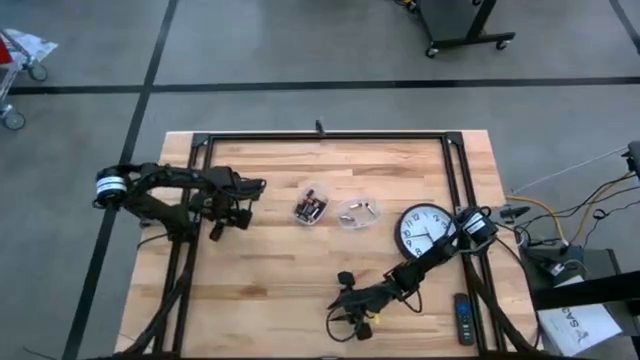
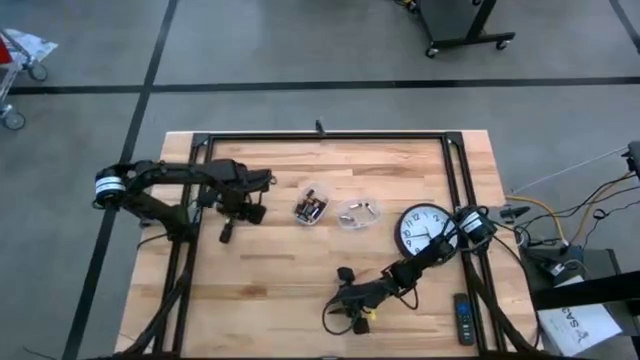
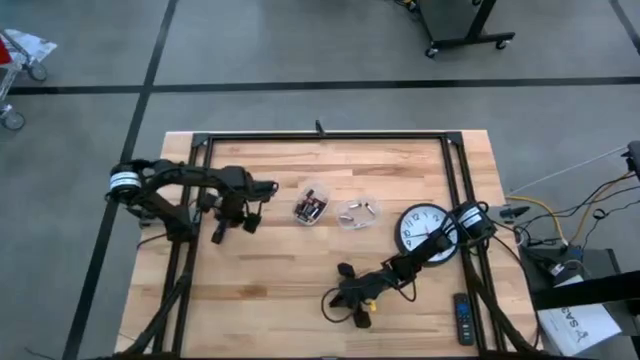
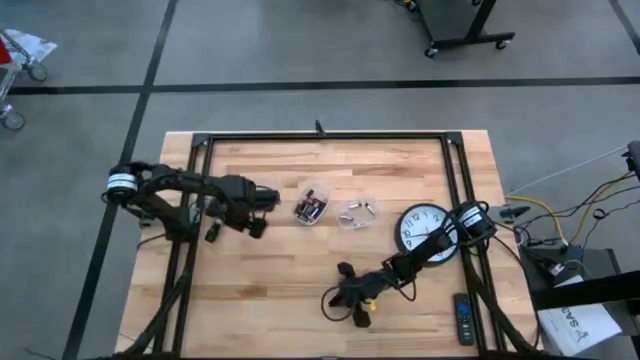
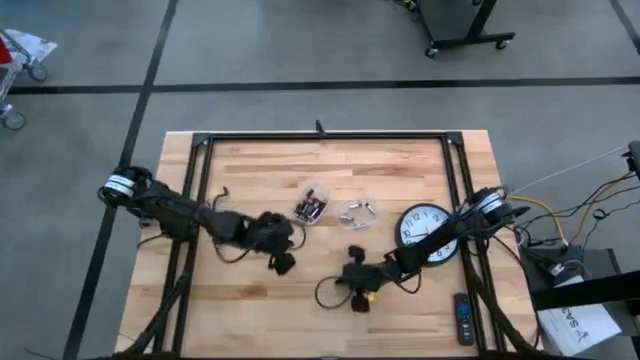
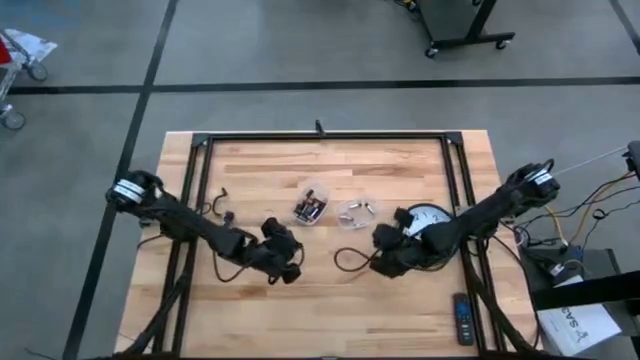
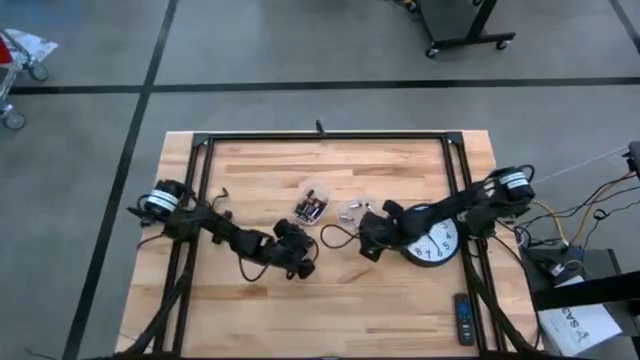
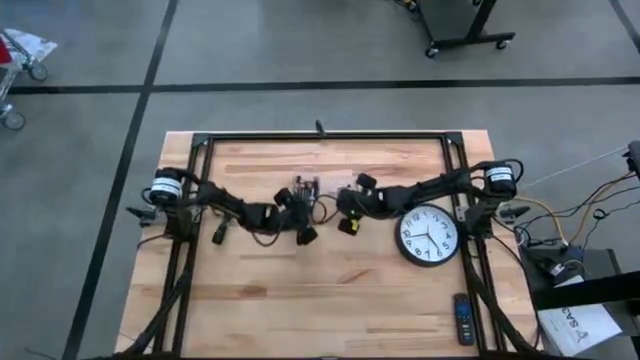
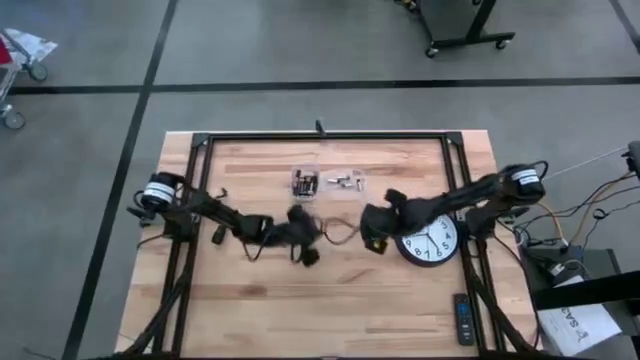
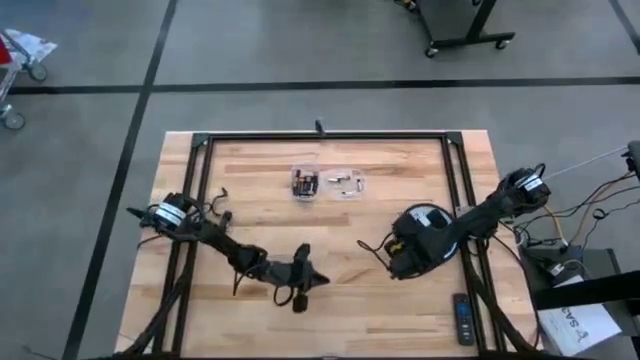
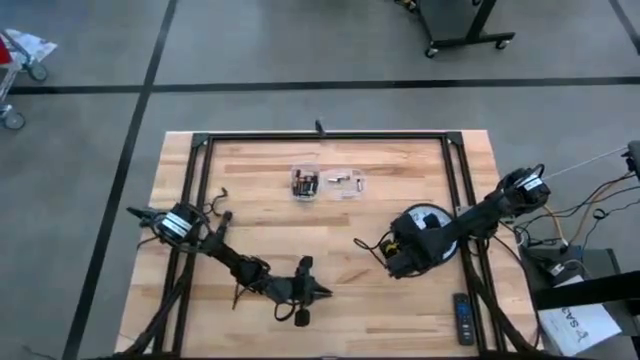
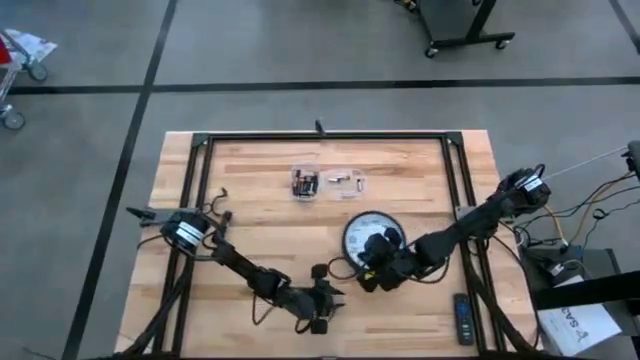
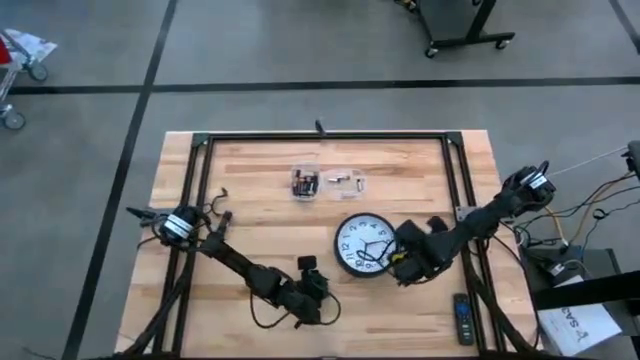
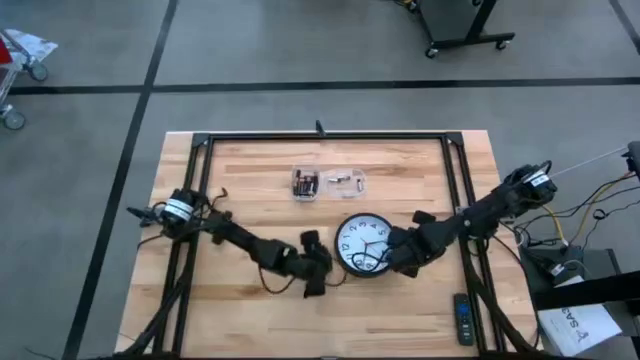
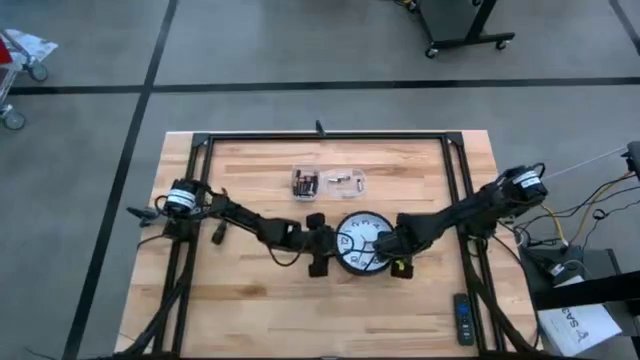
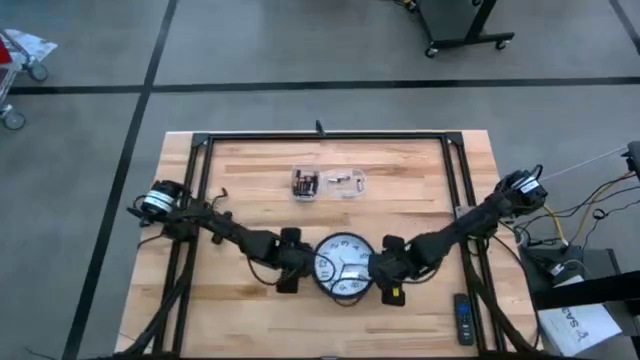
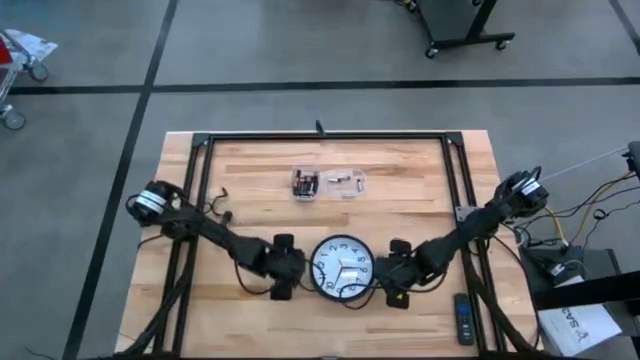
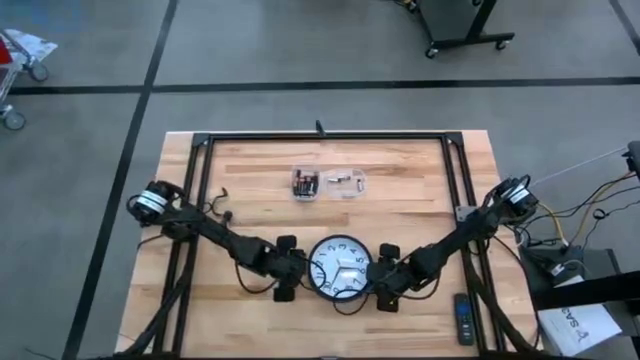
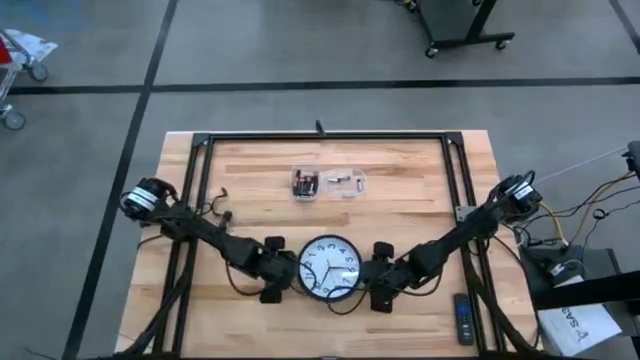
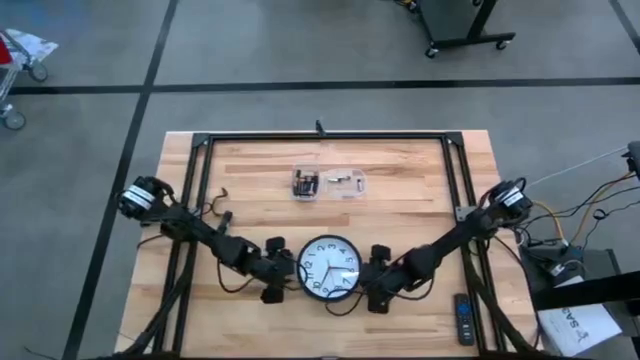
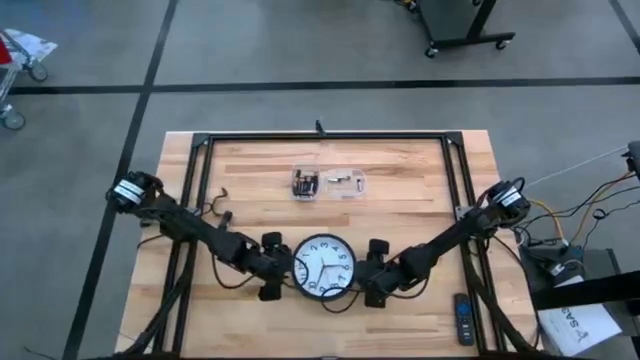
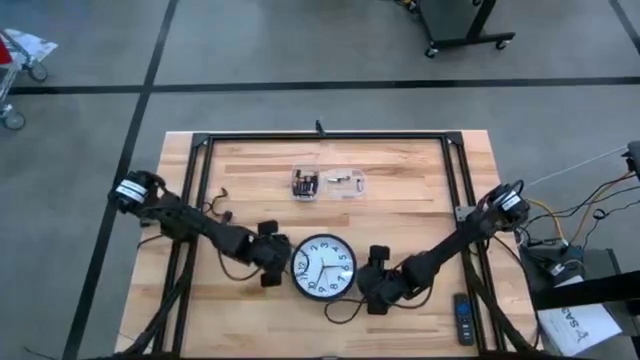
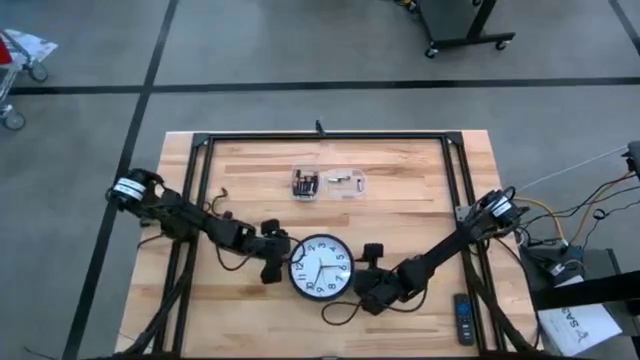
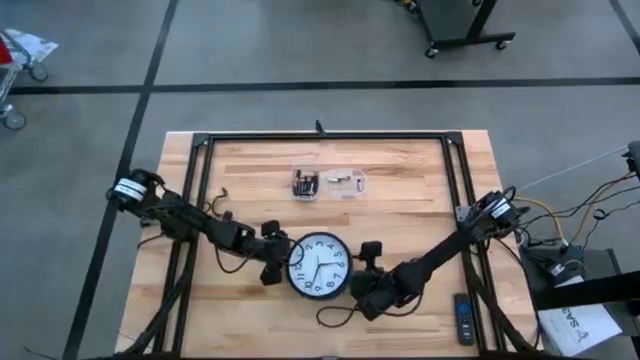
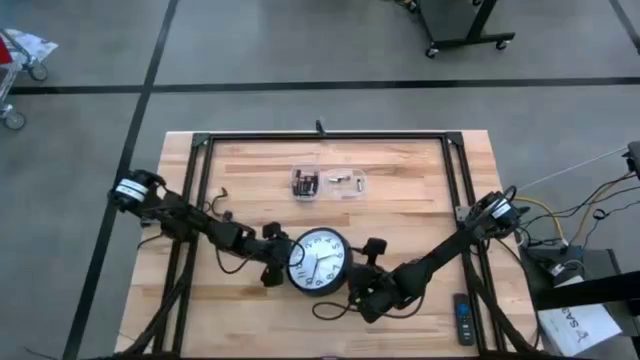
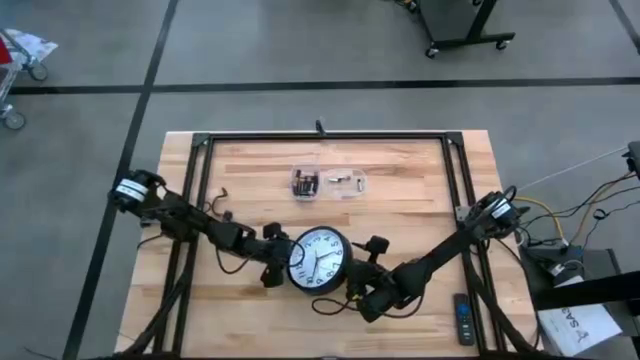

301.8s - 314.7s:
Task: Insert battery
Adjust the clock

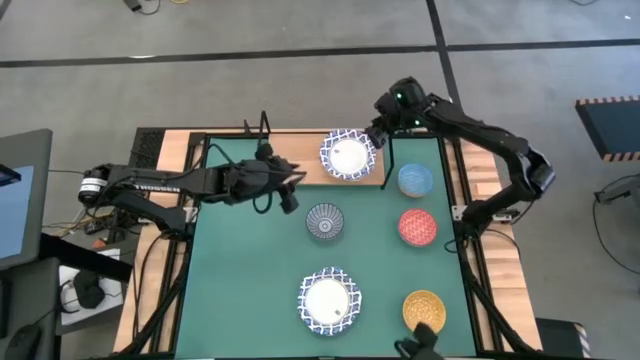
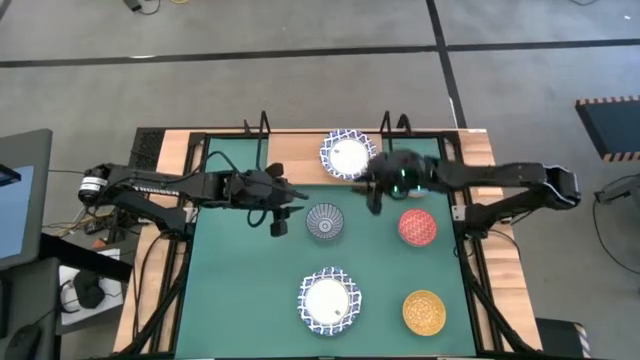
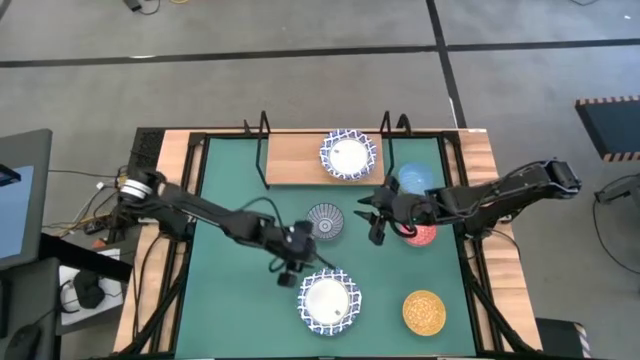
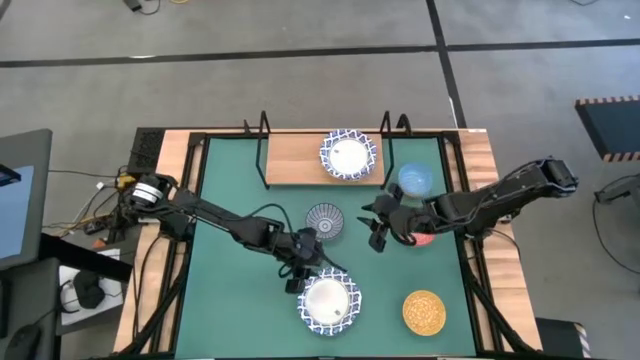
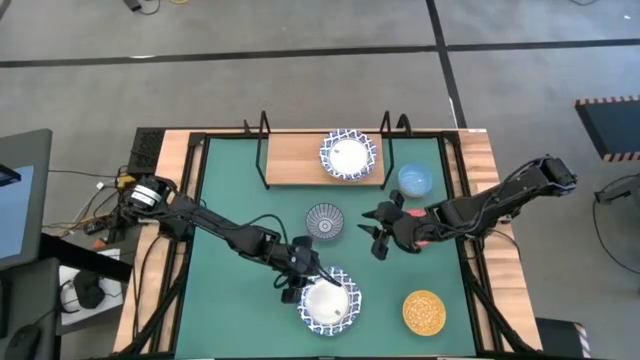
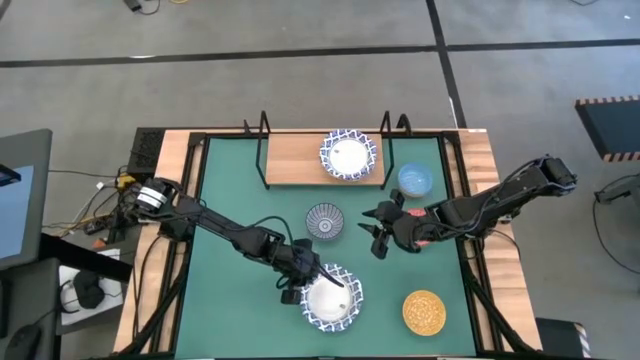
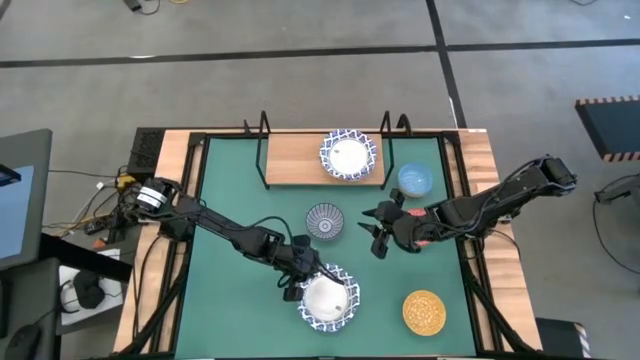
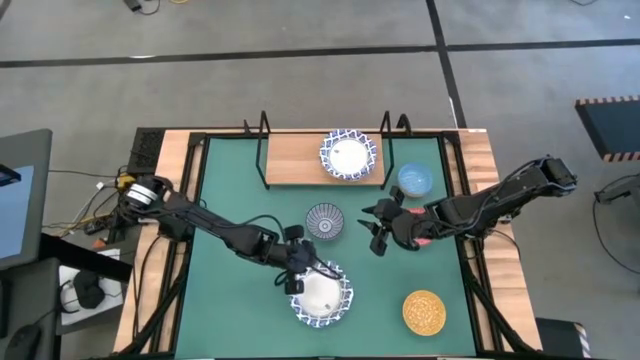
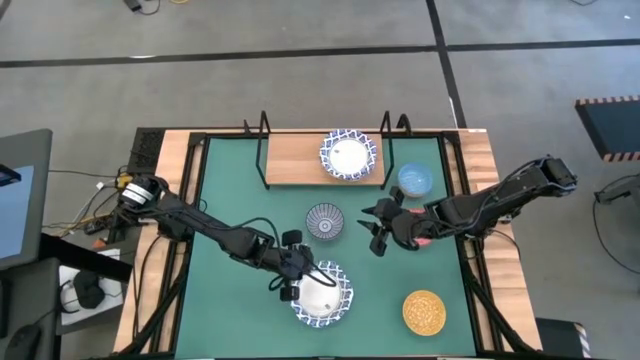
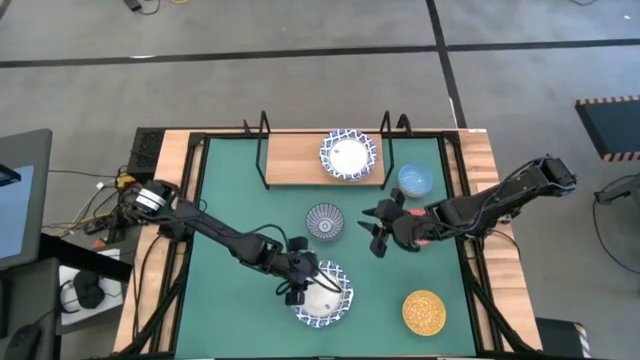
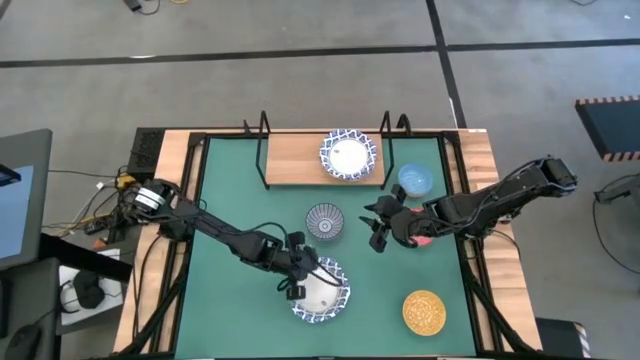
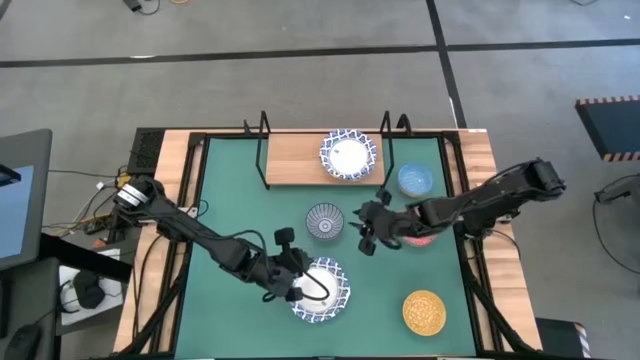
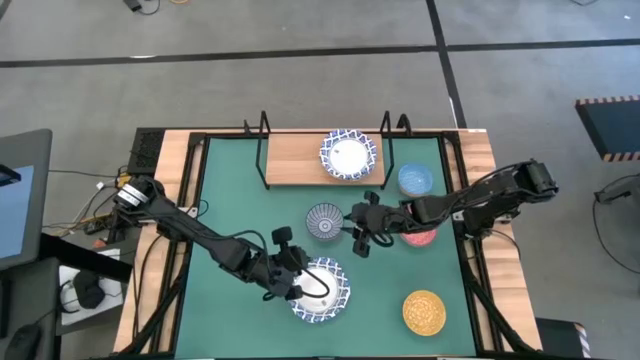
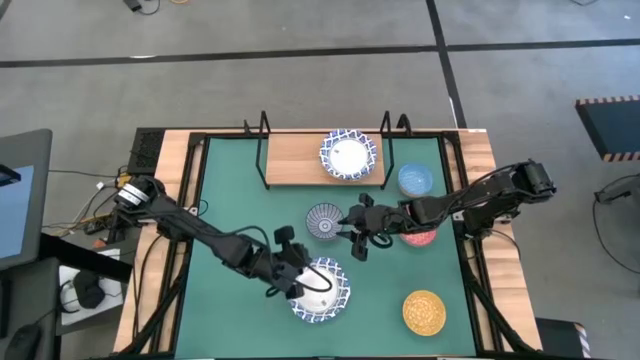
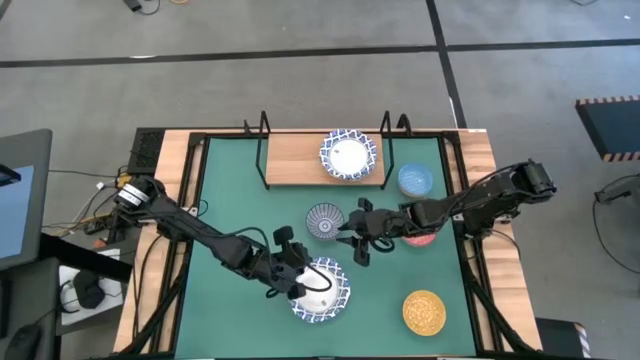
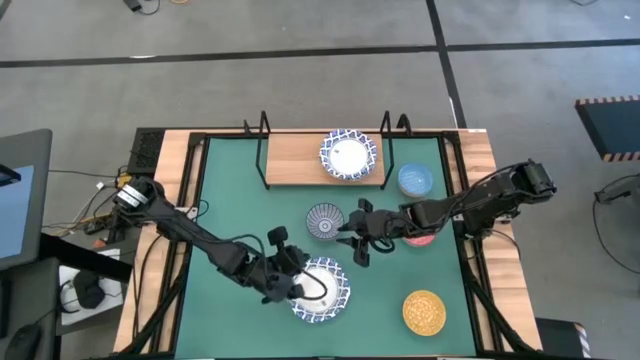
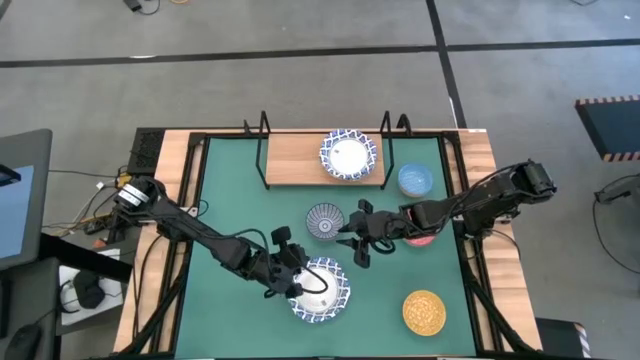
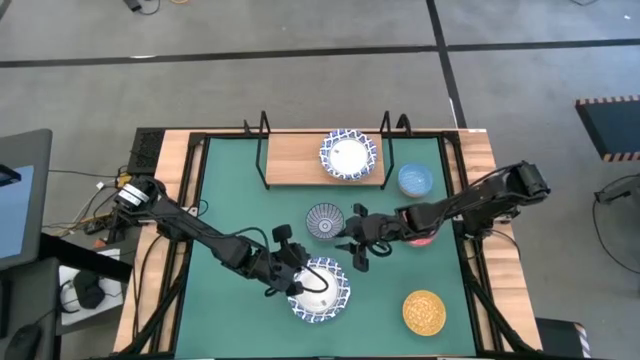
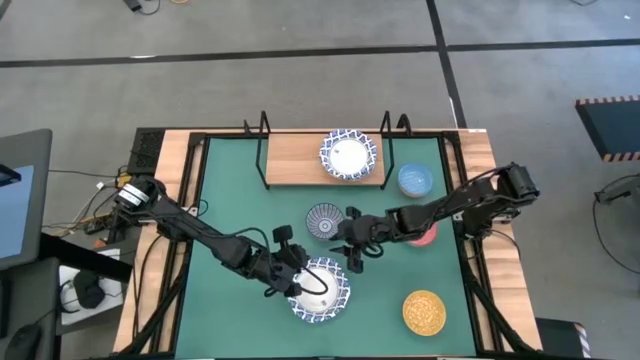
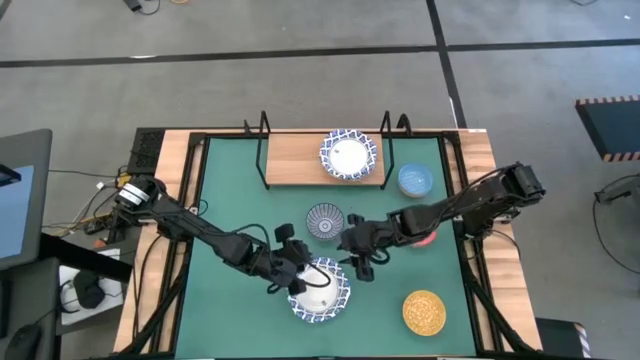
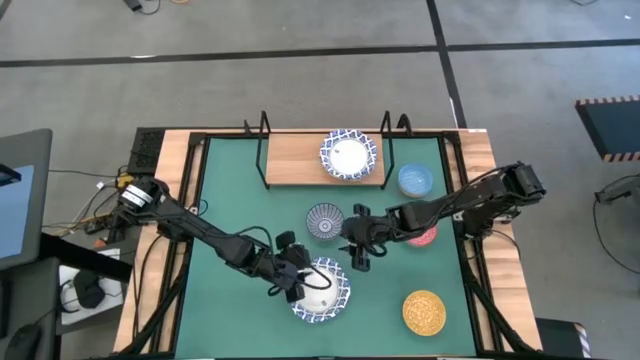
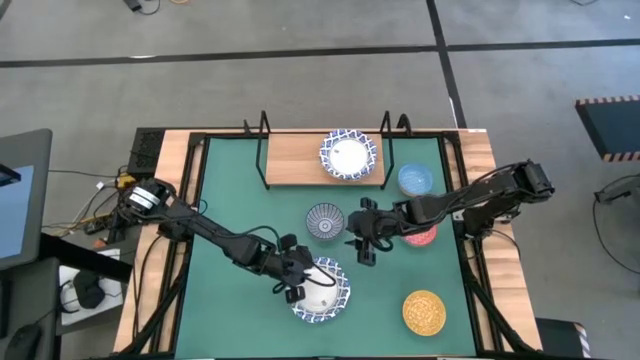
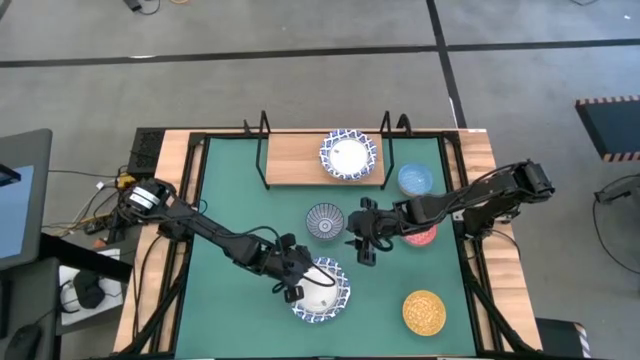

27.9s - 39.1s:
Task: Place and stack bowls onto a shelf
Stack the white bowl on top of the other white bowls on the shelf
